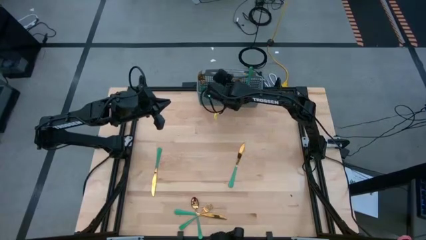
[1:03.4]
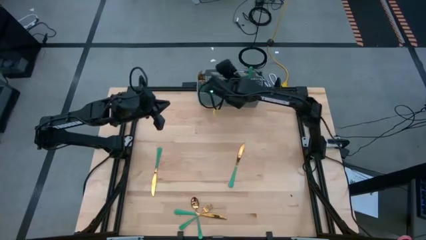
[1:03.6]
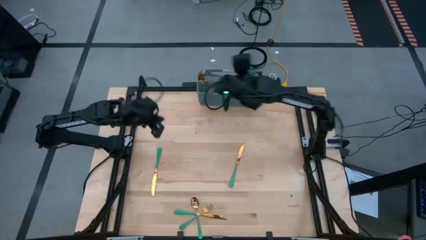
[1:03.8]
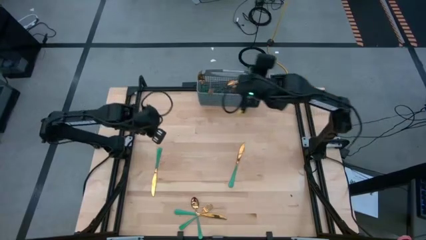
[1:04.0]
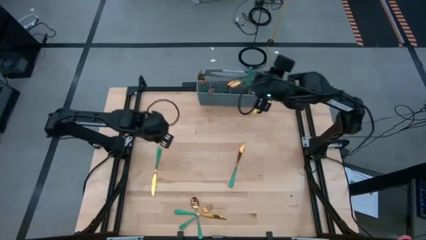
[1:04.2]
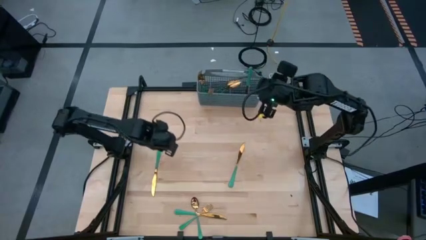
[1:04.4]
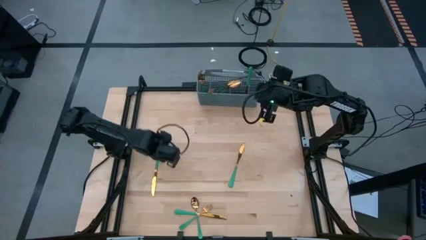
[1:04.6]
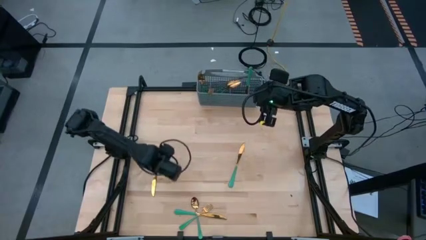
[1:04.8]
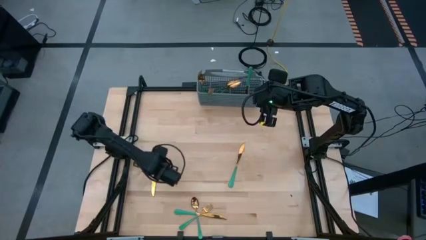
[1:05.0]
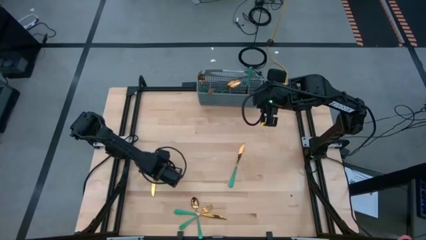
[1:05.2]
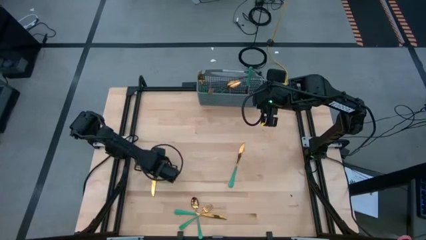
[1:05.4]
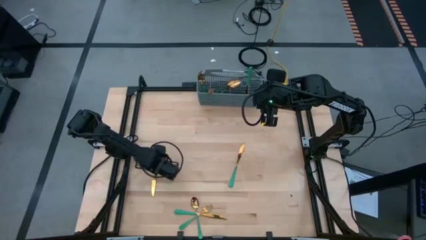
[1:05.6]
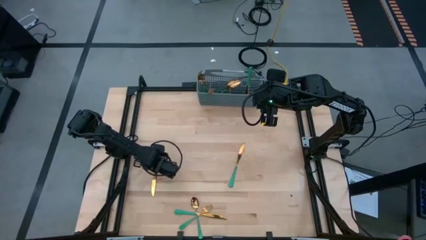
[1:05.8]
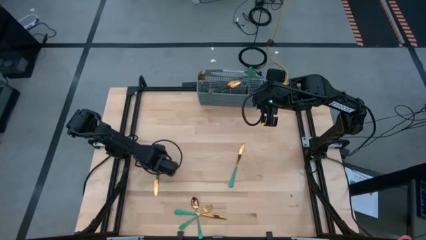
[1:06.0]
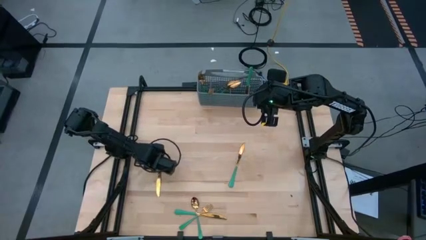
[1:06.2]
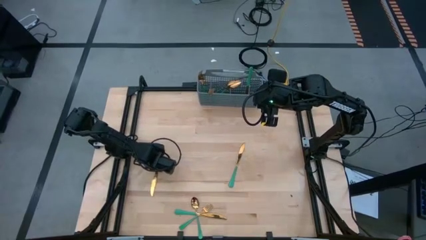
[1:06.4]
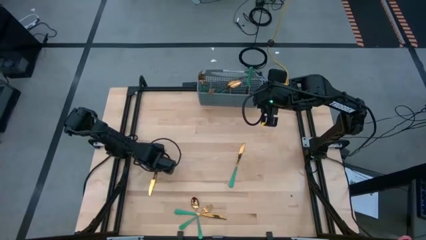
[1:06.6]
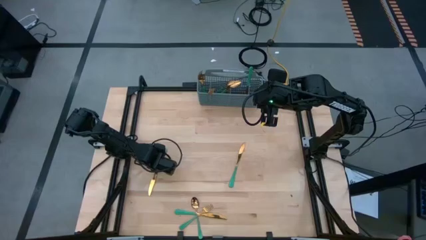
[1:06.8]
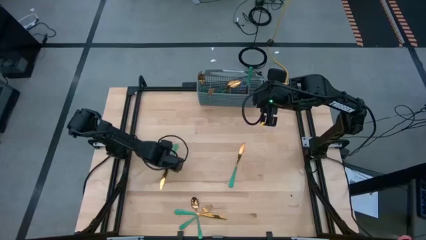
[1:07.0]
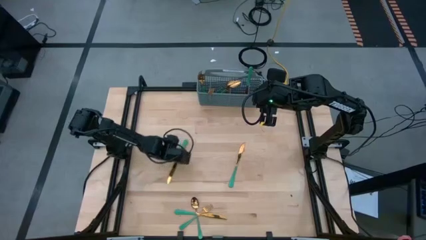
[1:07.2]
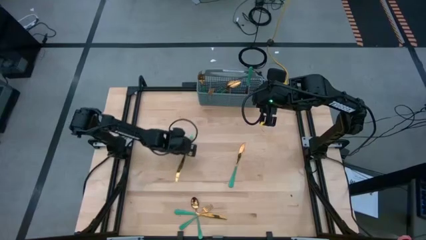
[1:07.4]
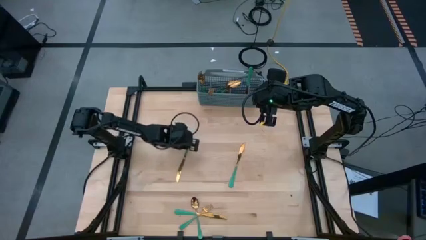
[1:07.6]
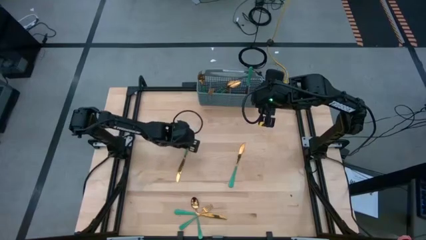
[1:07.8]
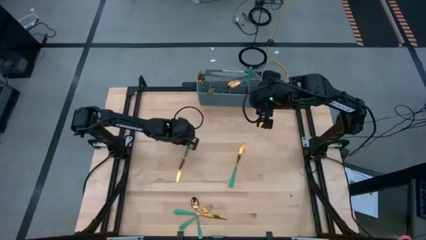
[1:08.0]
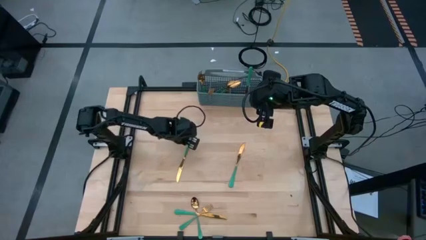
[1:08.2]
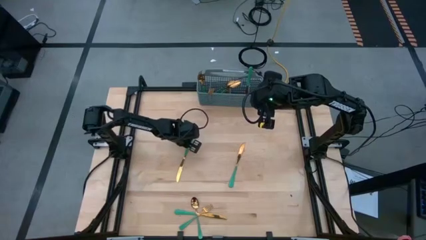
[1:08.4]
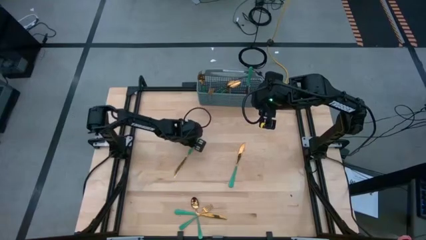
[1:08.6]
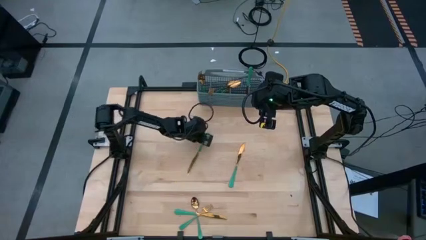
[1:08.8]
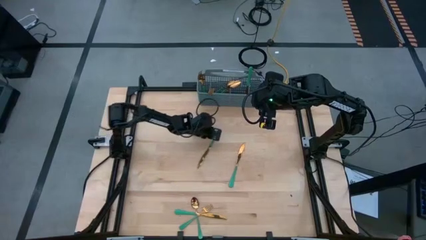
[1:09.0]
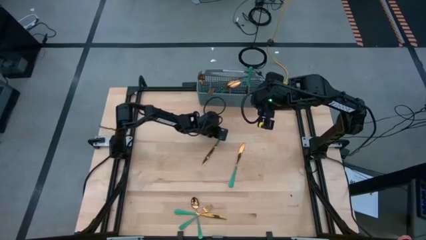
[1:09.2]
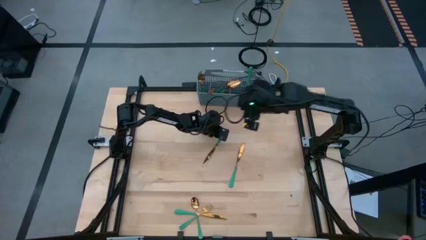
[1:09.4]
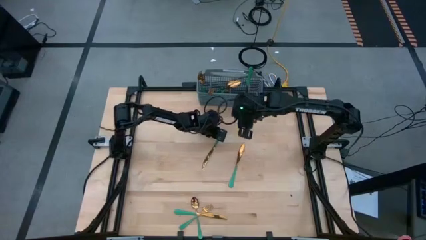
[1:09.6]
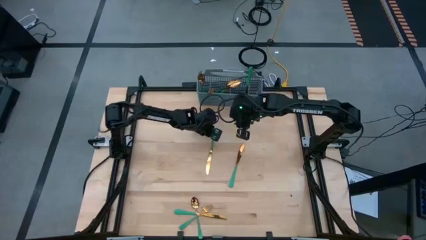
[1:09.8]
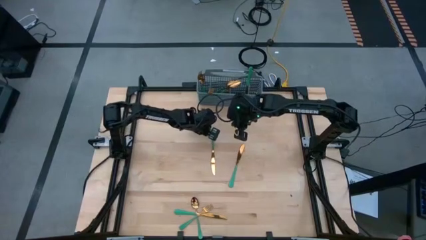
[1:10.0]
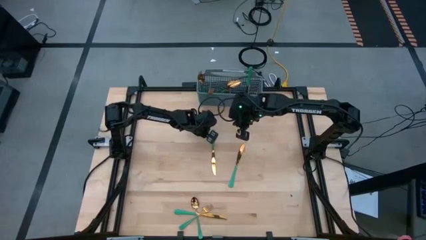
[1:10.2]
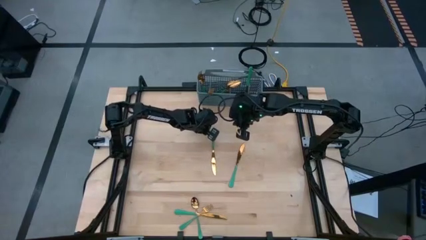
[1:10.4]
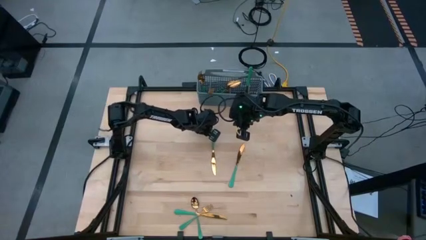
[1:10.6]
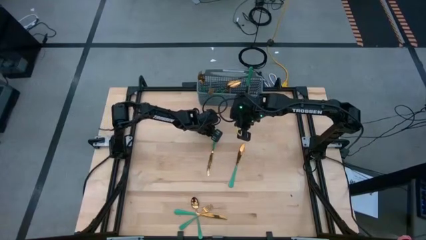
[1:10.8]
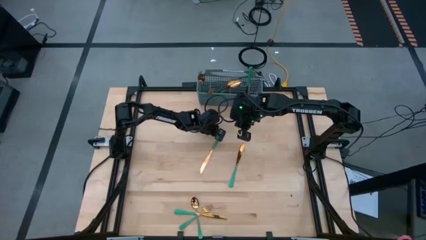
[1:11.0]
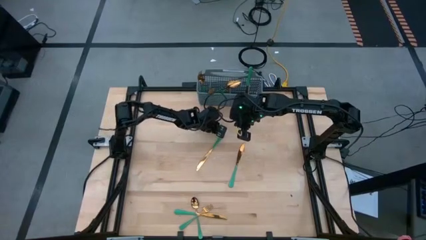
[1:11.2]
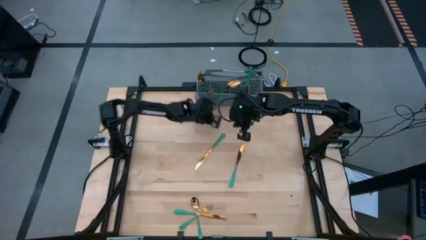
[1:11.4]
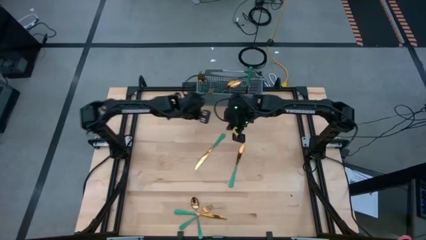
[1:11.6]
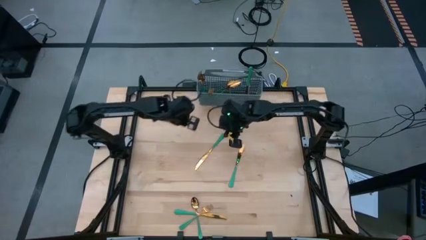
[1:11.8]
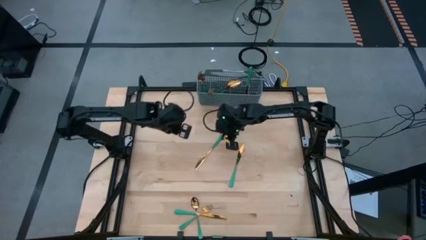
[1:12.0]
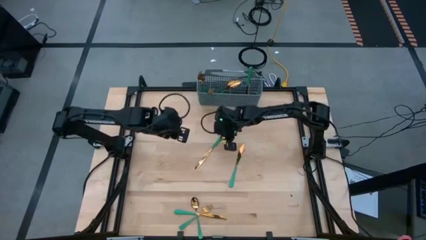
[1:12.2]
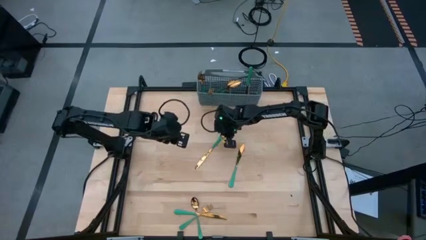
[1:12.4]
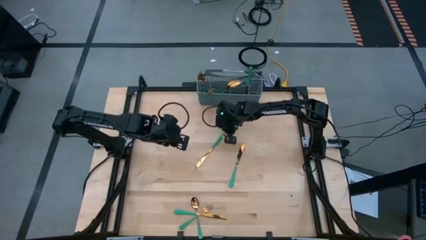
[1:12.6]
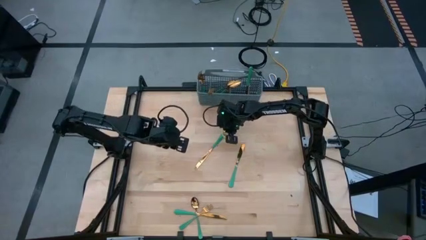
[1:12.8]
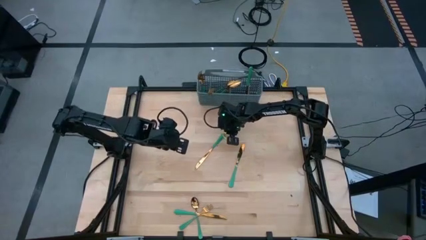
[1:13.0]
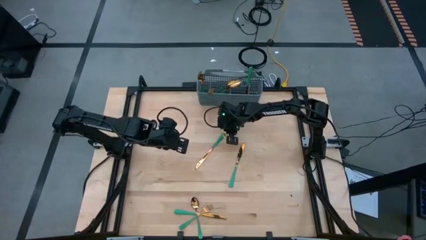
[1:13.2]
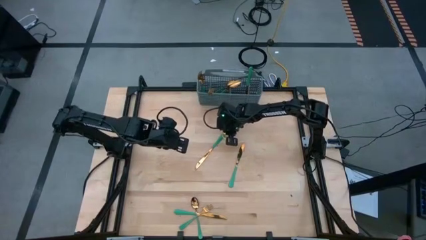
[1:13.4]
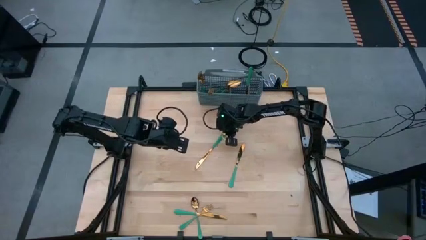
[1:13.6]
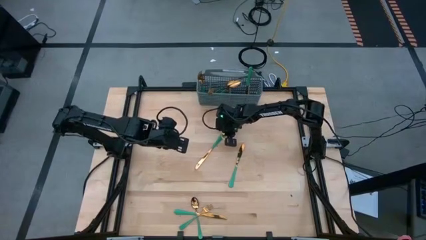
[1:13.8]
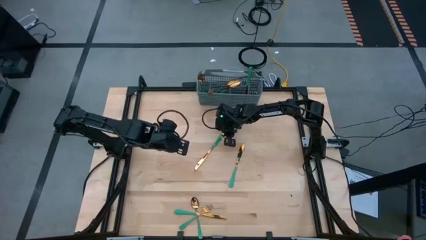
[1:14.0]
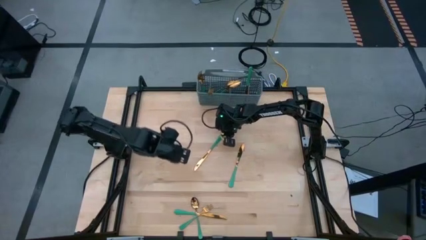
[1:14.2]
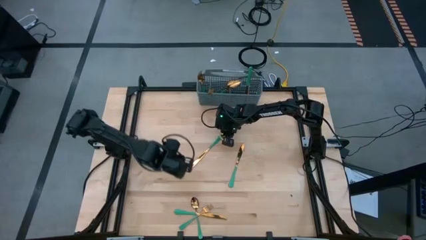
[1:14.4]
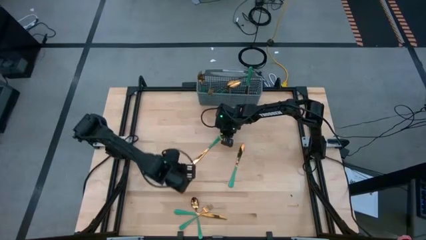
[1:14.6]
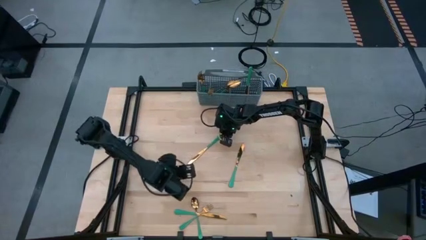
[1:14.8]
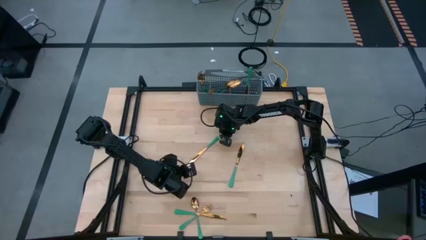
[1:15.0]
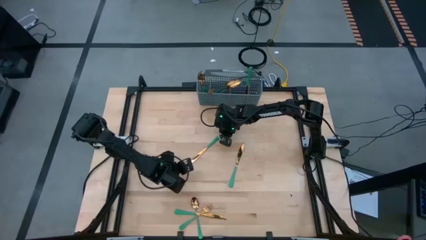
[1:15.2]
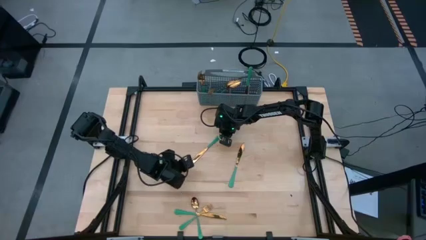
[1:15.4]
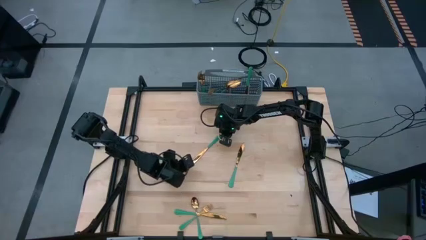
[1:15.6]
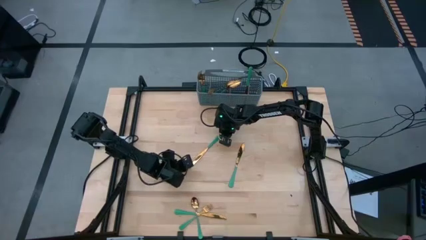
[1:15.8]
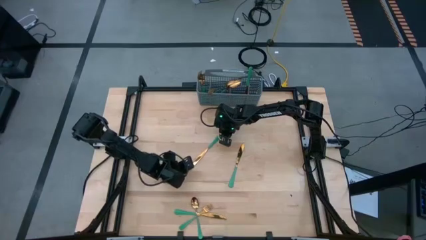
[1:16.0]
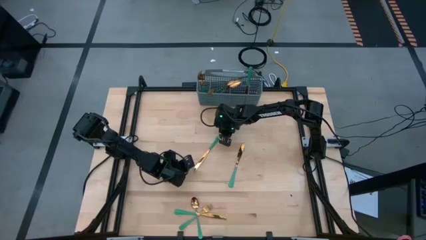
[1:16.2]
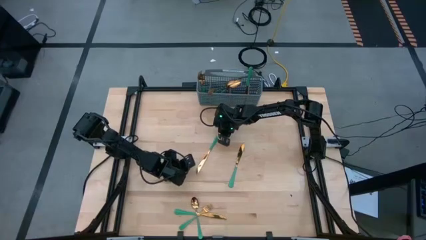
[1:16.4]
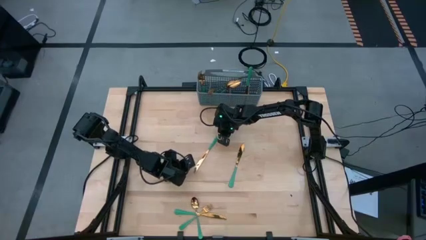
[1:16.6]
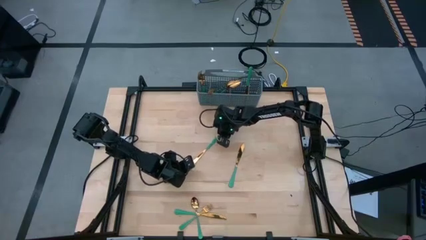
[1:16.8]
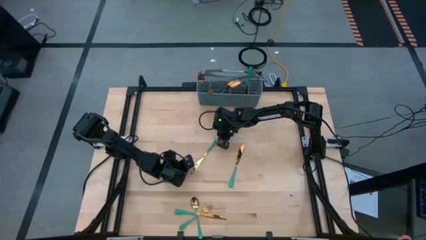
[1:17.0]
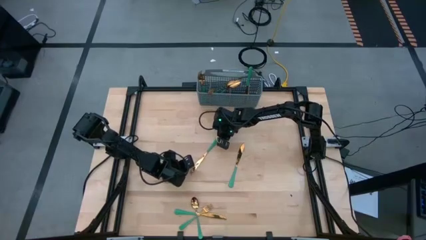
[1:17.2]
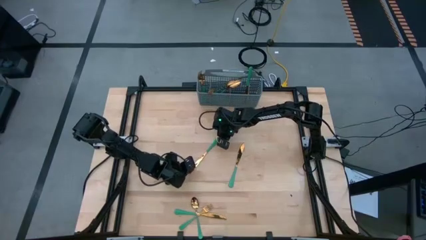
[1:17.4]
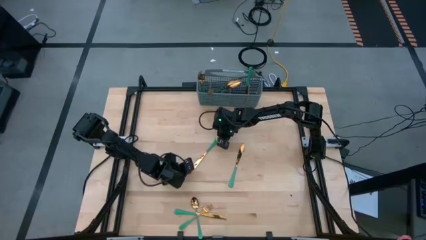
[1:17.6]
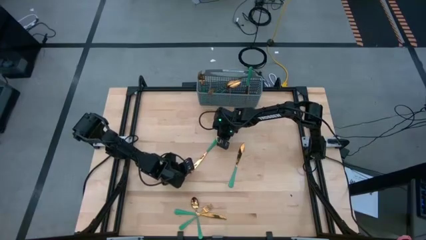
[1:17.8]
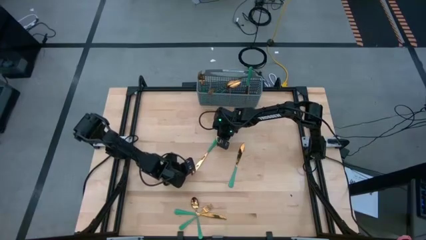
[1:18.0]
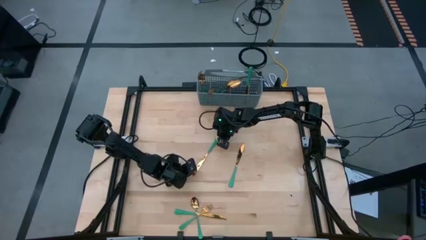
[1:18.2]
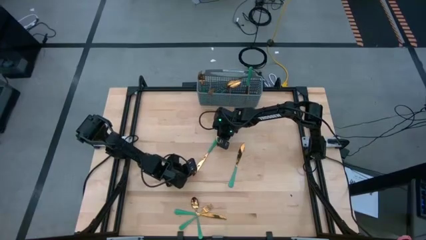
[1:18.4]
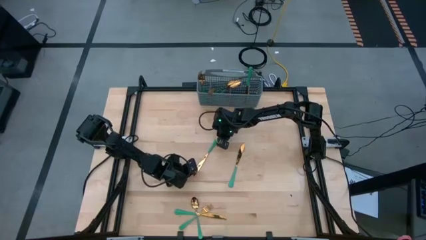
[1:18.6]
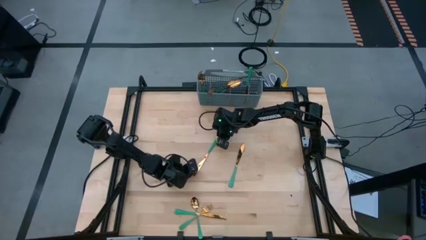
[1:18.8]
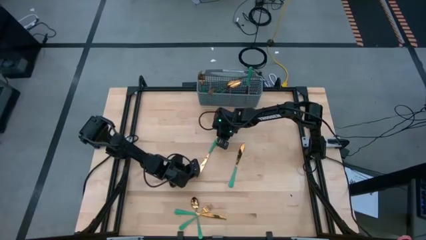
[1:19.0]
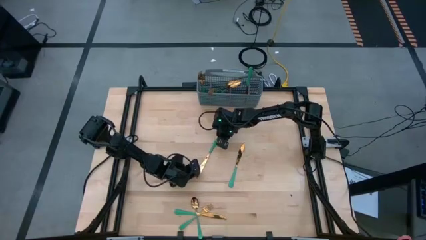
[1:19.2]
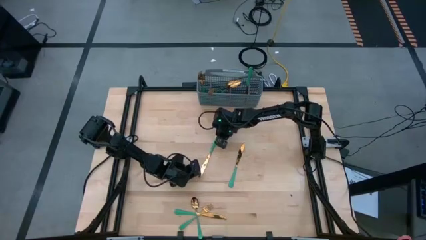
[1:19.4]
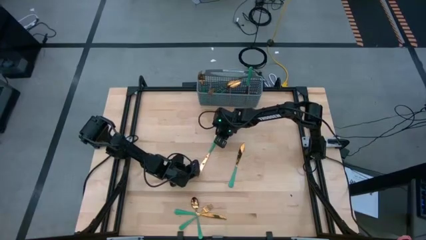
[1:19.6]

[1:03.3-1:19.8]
Task: Sort silverware
Put the green table knife into the gray silverware basket with the other table knife
